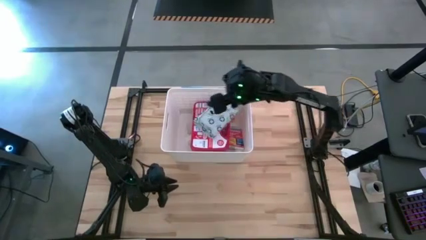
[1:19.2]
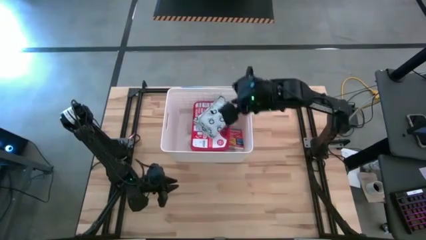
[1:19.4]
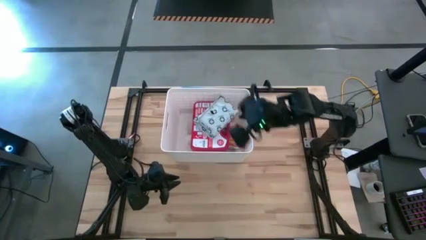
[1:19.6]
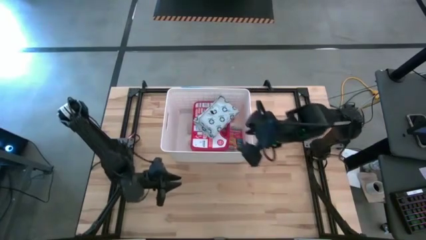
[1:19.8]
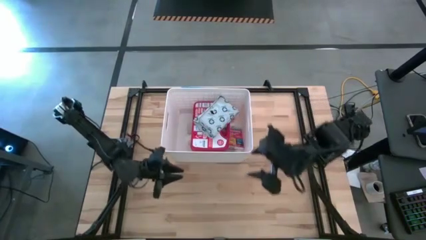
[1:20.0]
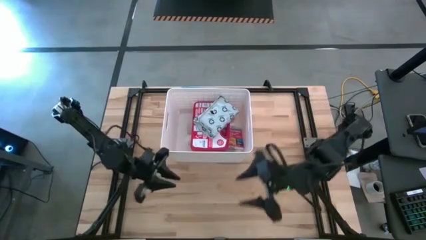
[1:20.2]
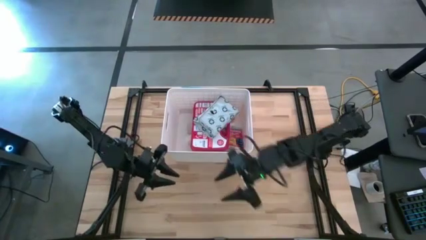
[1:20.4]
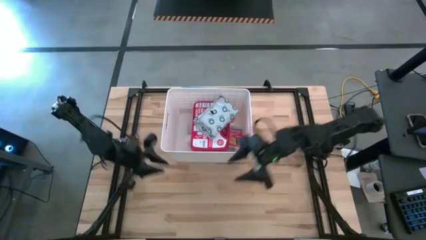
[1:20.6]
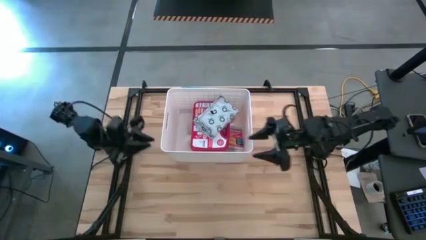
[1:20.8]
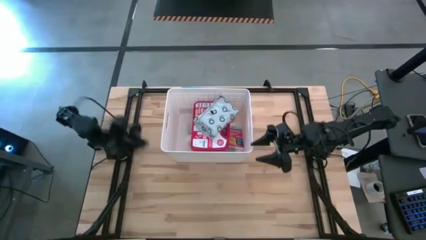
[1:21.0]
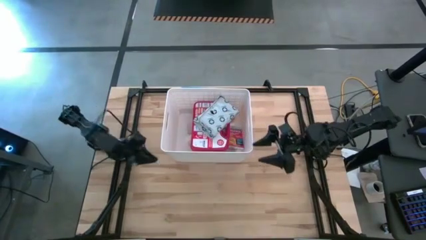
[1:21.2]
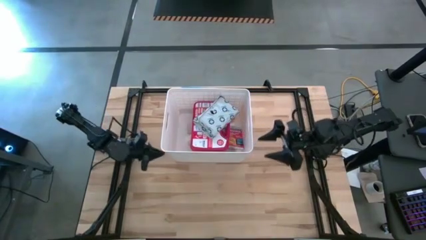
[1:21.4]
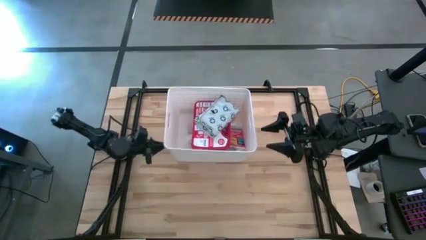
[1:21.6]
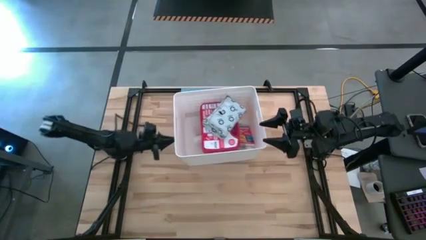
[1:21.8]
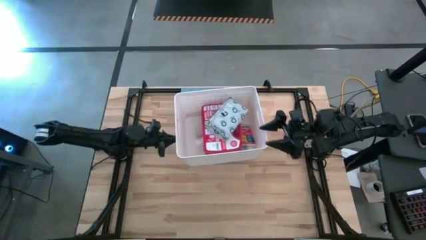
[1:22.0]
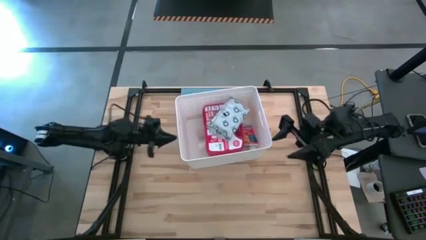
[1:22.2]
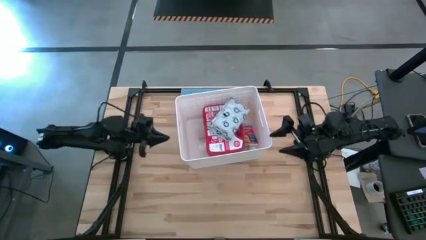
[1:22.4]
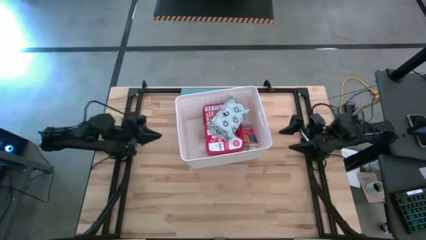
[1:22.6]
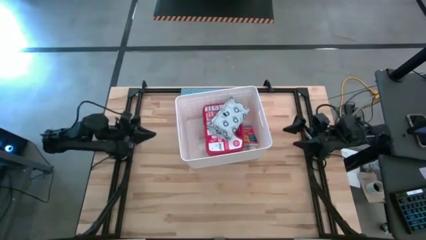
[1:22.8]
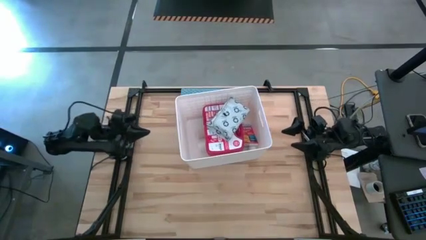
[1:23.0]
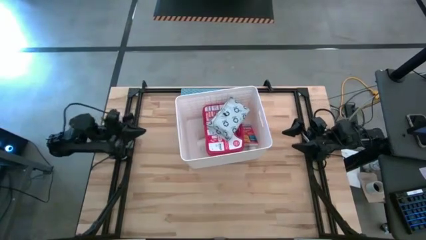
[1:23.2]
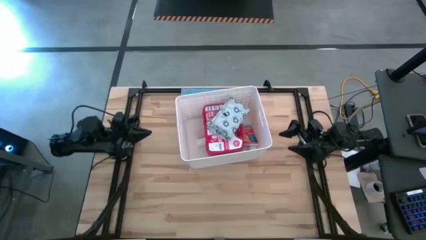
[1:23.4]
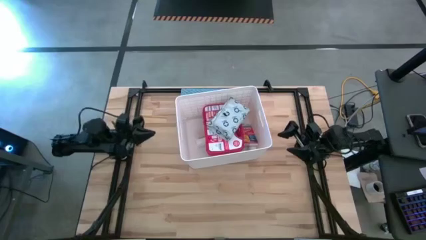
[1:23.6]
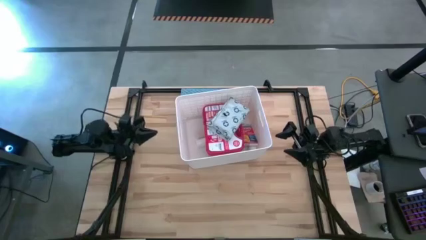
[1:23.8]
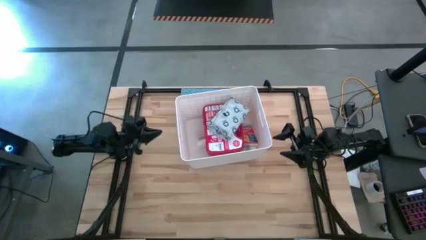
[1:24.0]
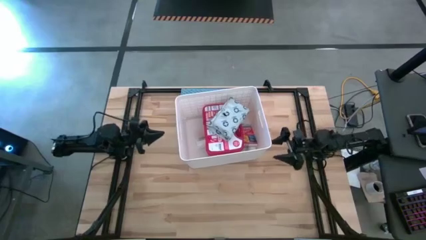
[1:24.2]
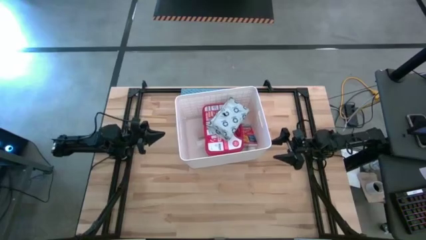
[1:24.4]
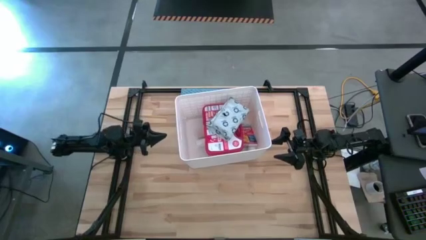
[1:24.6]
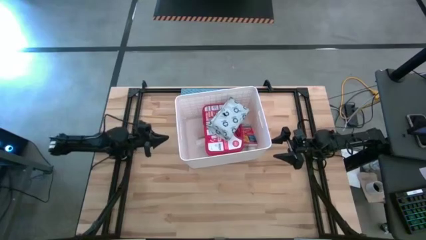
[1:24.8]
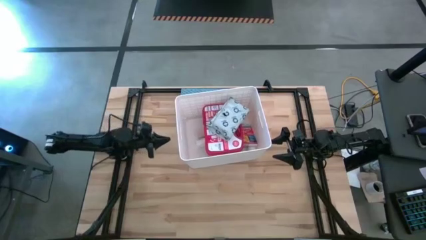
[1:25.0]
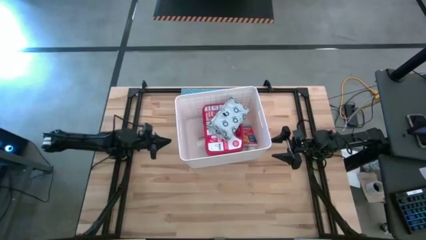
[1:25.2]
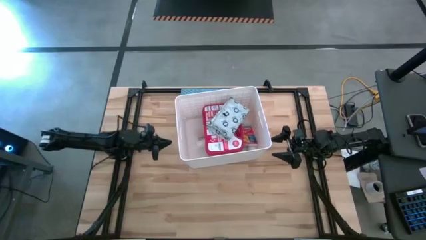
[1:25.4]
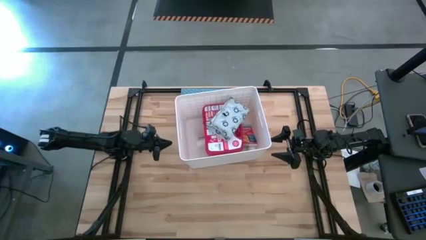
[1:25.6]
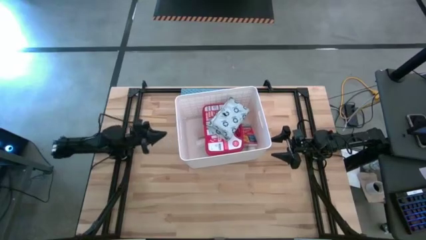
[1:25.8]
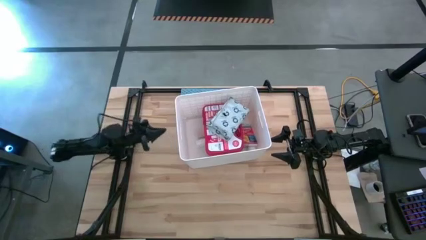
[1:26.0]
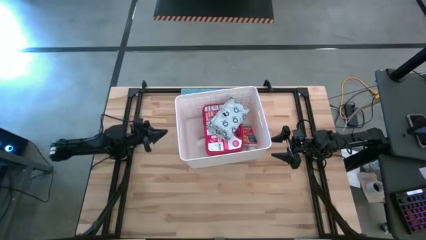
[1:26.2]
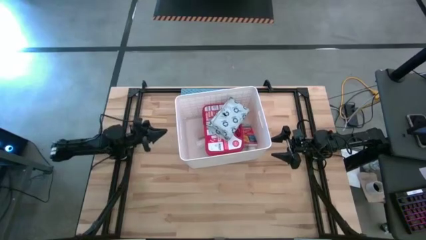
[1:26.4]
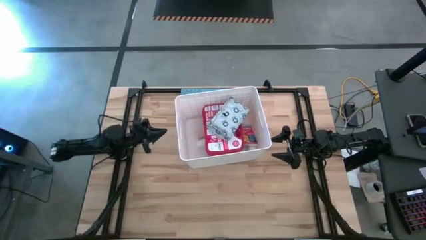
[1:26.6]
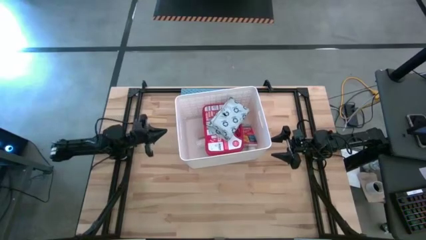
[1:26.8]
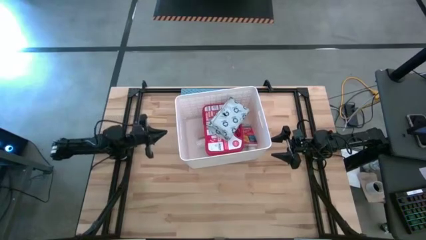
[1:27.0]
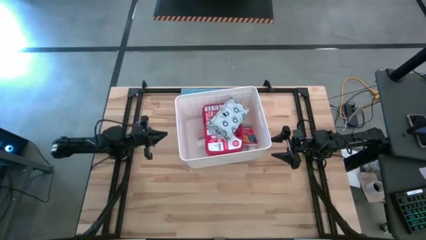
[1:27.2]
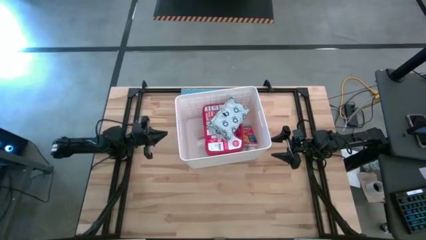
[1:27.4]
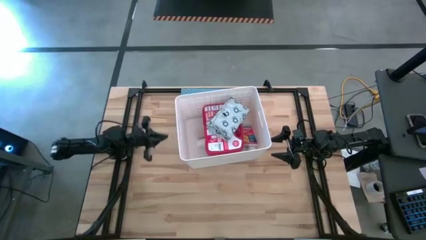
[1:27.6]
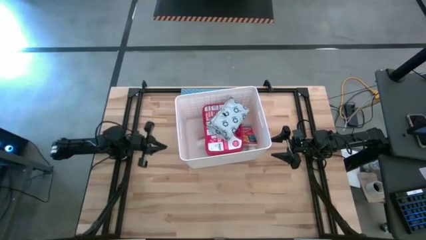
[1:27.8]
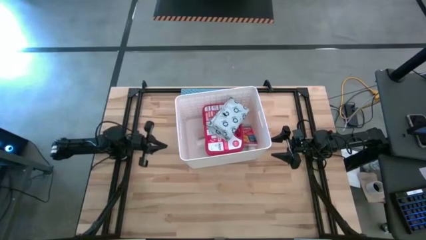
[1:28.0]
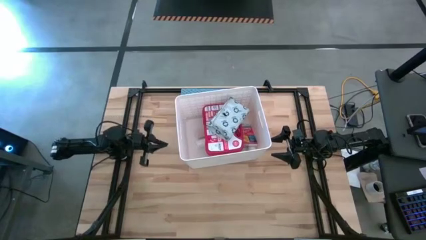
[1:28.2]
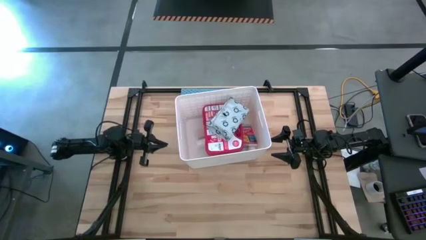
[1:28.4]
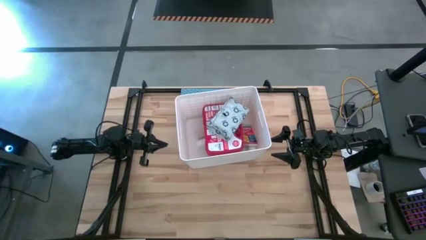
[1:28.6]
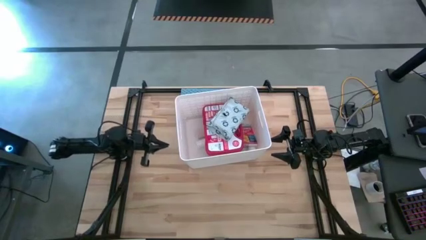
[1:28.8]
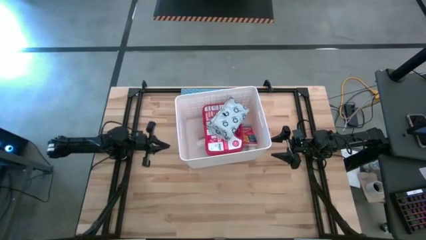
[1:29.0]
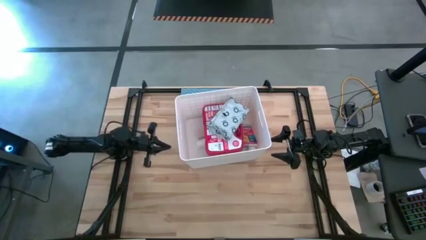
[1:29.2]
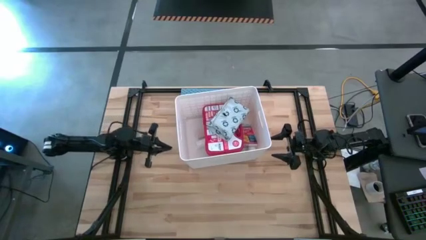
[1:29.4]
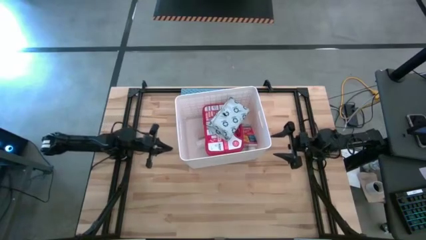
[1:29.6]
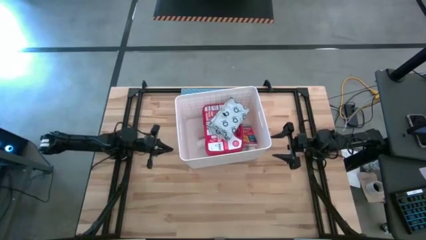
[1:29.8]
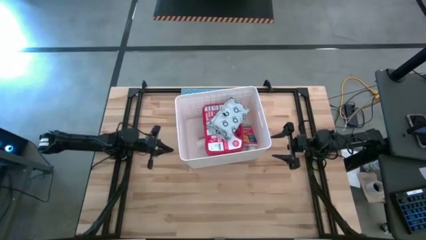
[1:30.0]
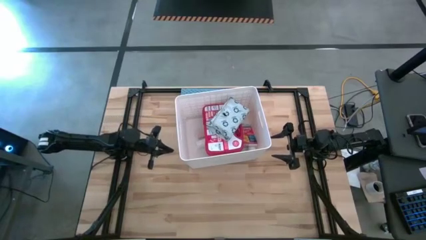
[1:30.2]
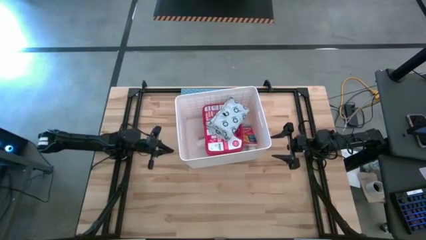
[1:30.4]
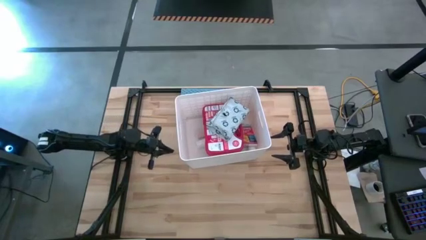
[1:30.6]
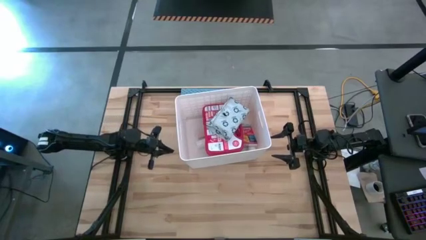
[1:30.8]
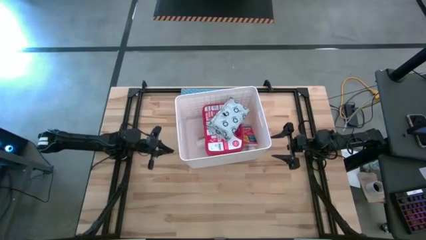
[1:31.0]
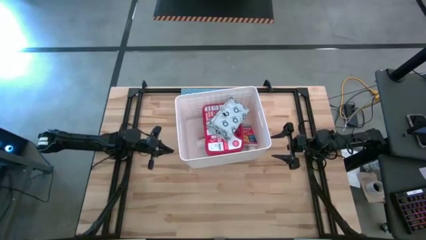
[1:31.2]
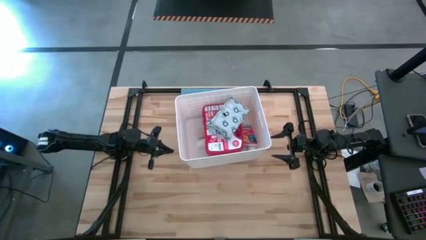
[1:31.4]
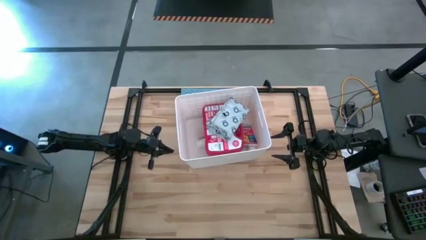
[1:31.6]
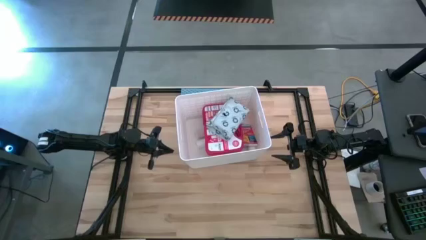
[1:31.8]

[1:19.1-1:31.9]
Task: Pick & place medical supplies in basket/bin
Return to Home Position
